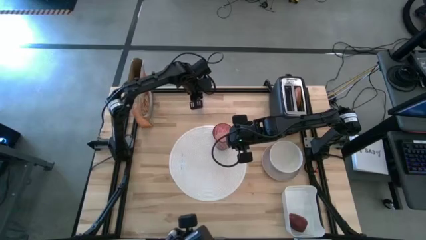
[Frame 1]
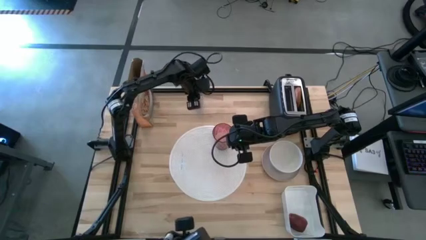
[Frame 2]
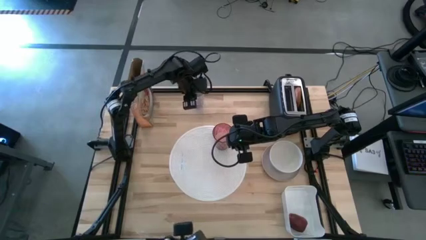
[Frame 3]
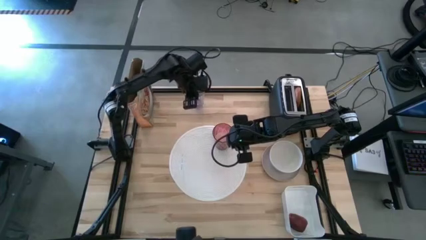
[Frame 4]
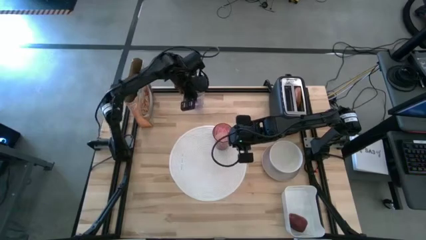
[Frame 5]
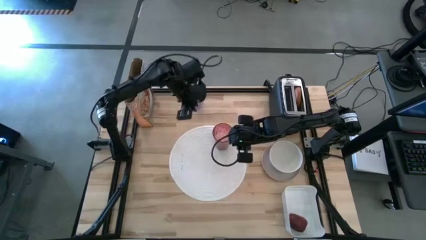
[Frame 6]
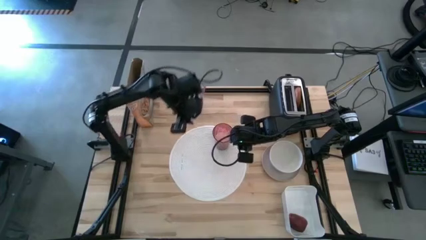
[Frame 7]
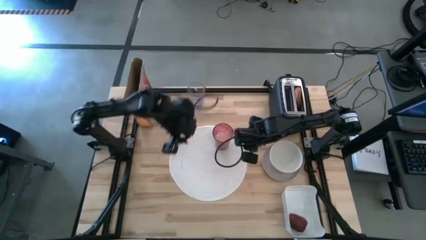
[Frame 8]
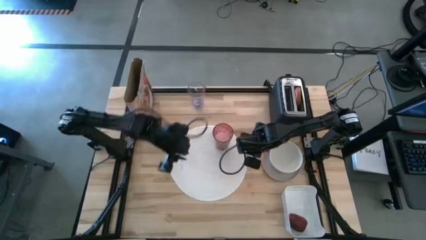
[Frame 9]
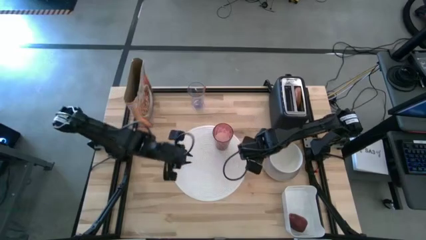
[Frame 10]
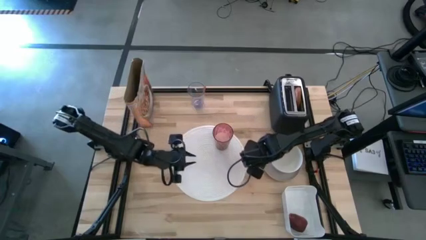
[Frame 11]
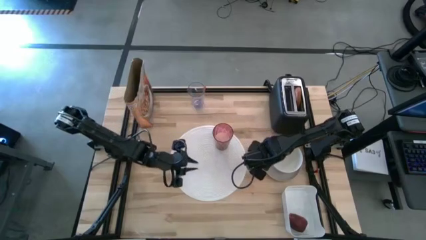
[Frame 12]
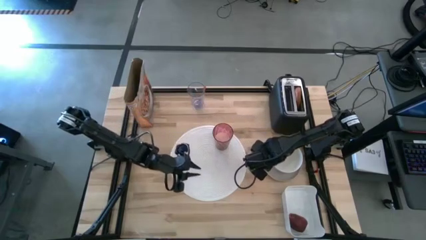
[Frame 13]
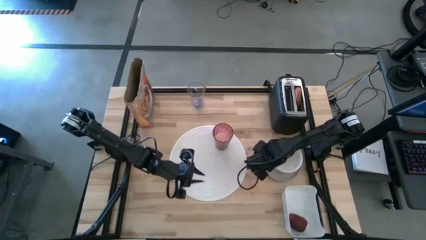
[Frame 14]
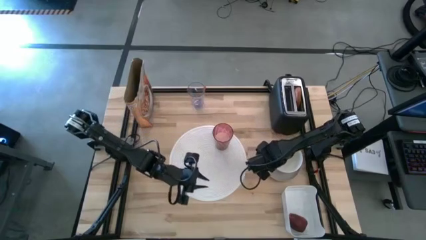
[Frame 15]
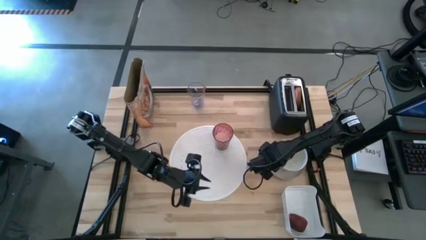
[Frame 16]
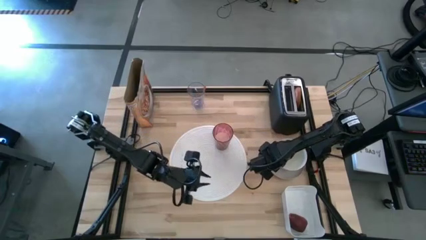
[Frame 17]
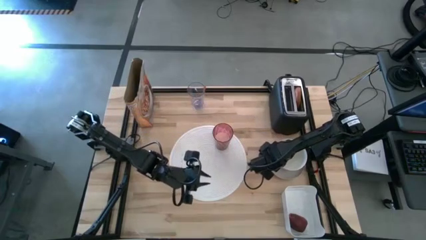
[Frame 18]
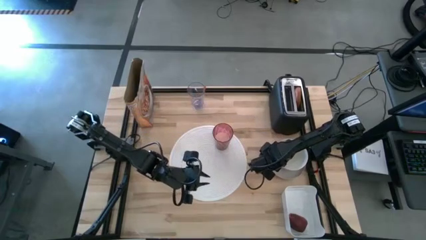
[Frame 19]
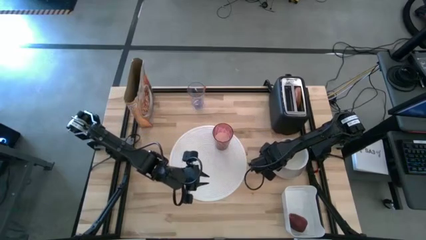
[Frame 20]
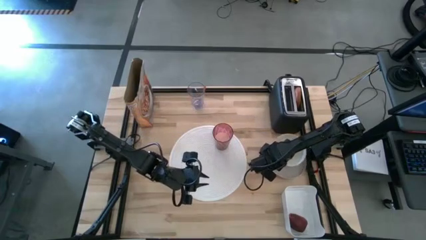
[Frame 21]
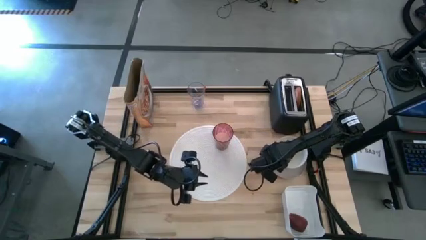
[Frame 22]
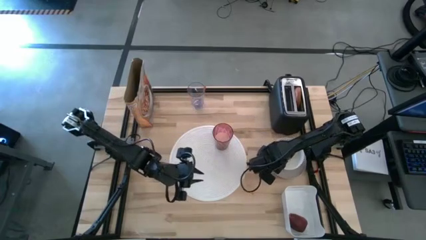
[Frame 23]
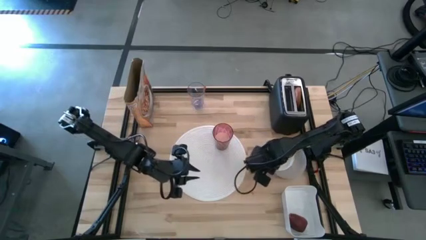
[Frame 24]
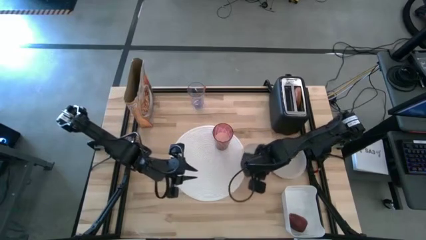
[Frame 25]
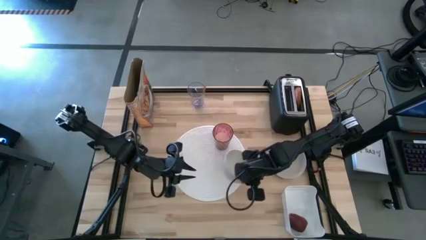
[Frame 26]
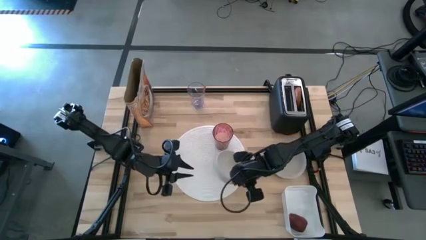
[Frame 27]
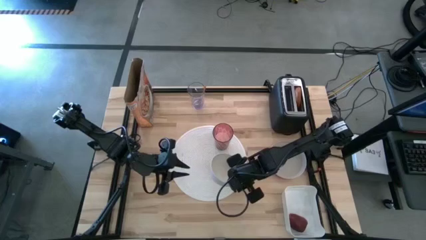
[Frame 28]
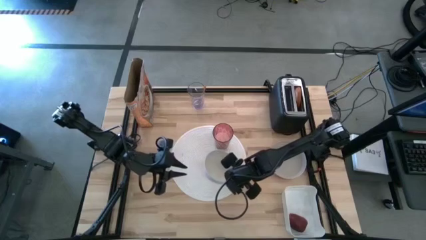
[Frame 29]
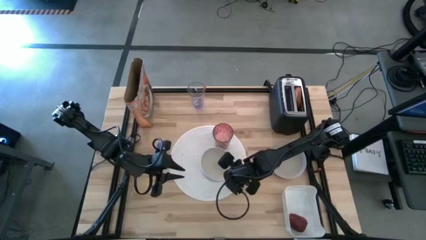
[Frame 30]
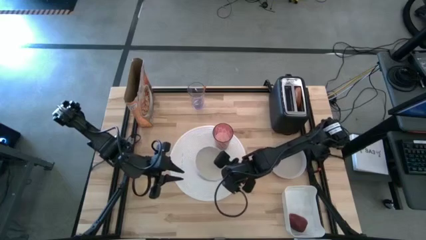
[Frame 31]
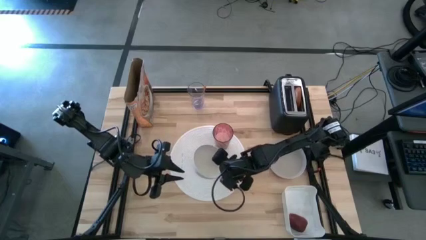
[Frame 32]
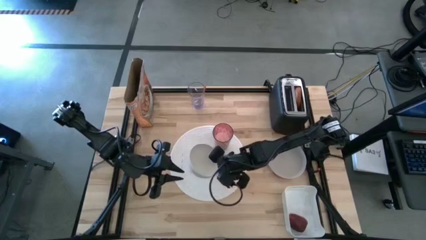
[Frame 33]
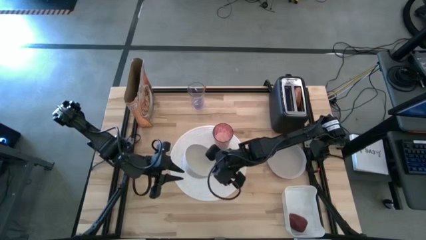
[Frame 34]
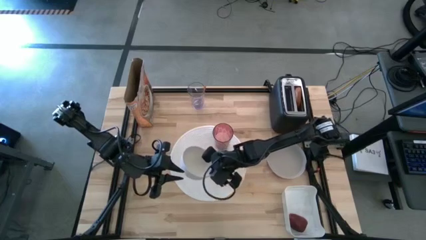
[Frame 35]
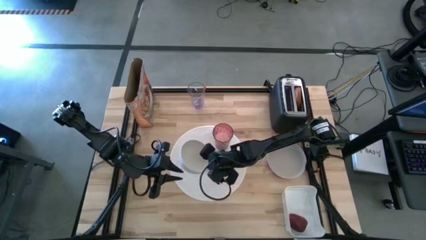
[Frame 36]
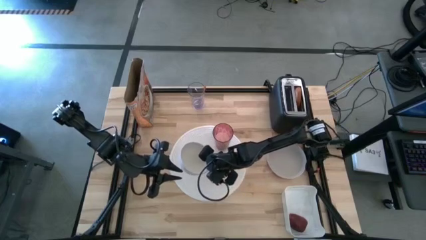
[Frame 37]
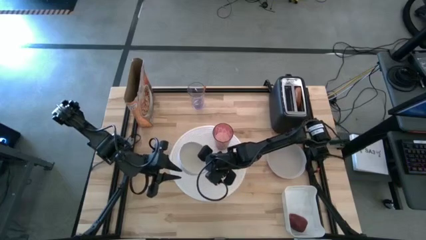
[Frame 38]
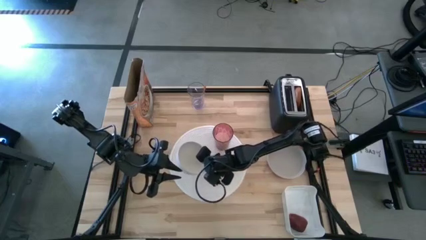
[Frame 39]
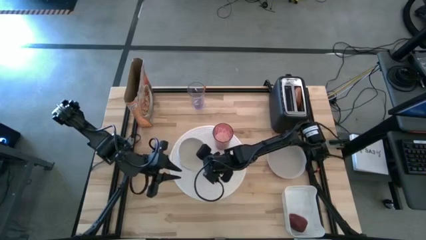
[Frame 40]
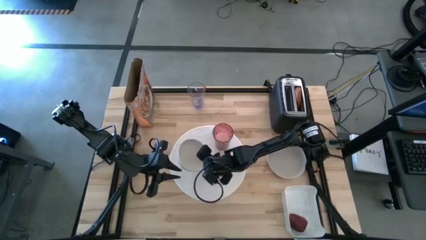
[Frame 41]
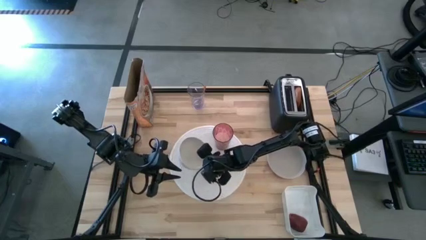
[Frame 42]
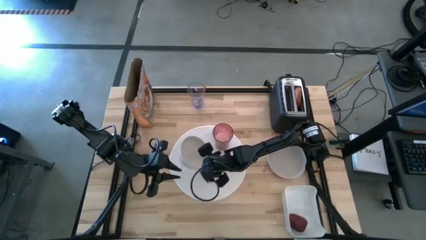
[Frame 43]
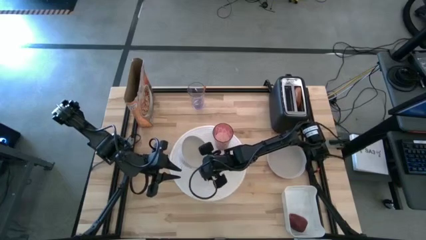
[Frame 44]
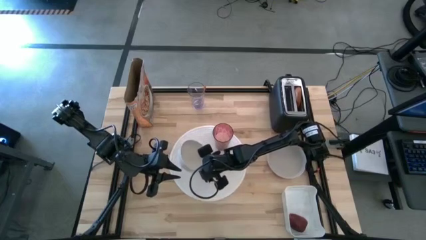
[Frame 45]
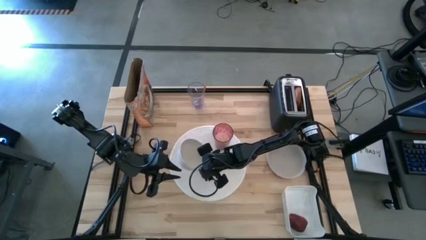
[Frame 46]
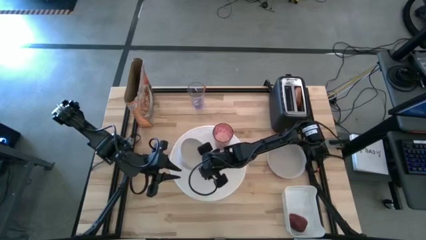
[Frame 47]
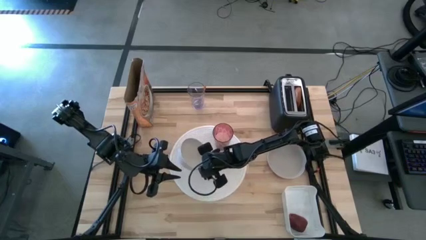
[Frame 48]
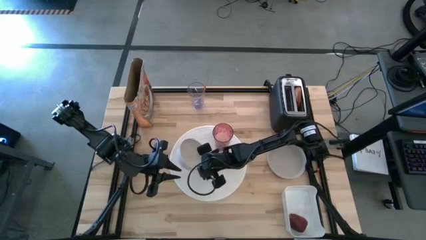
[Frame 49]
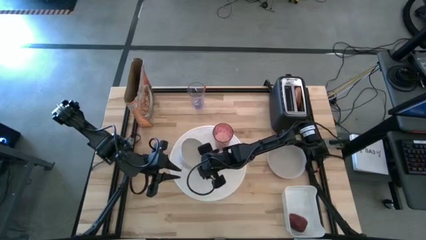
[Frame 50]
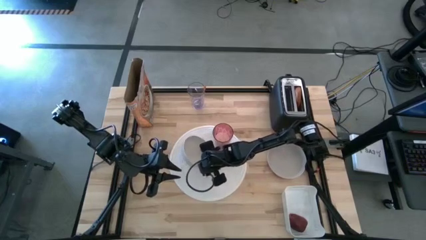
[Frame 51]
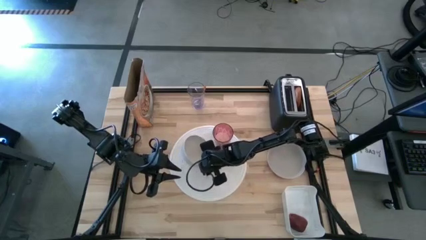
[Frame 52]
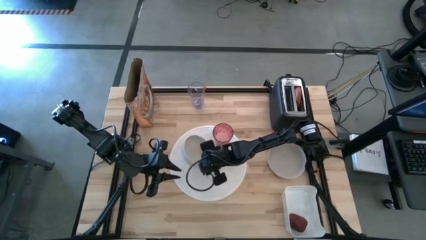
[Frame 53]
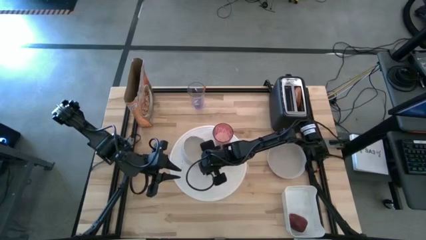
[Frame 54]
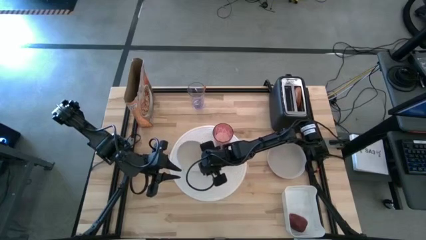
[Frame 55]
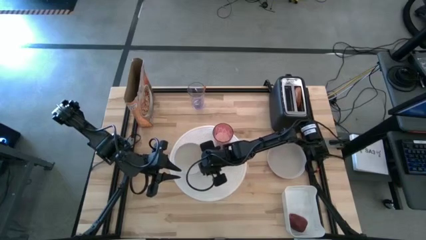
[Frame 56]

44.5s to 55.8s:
Task: Arrange a breakfast setting
Put the white bowl on the white mat

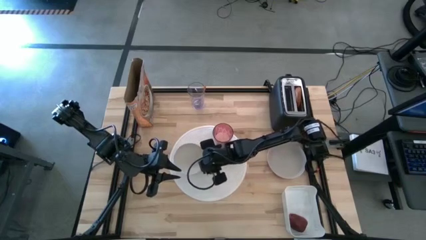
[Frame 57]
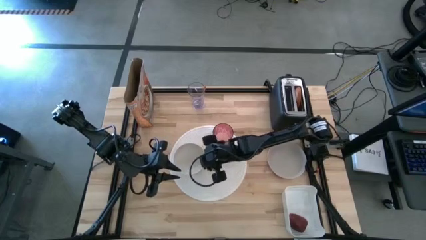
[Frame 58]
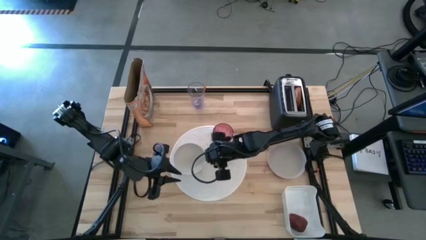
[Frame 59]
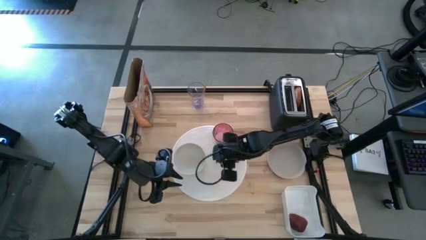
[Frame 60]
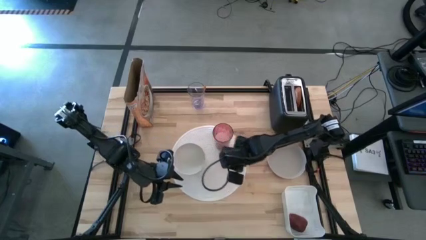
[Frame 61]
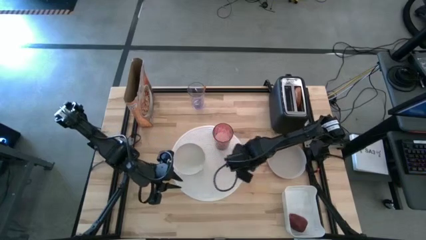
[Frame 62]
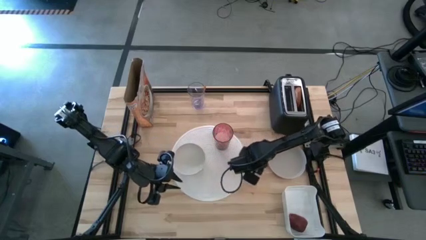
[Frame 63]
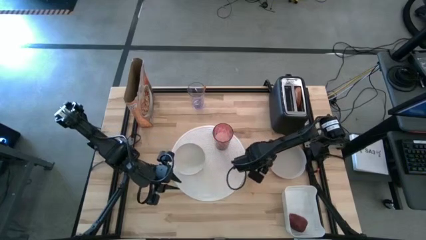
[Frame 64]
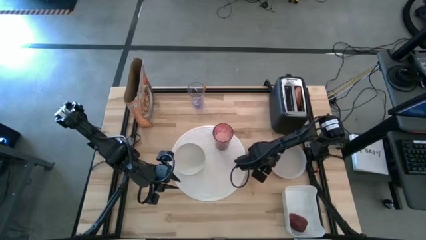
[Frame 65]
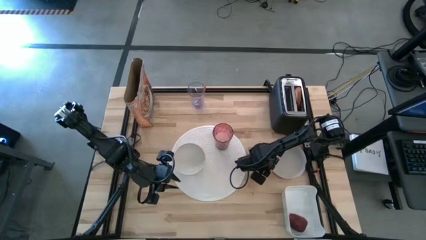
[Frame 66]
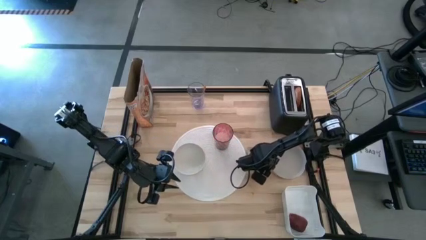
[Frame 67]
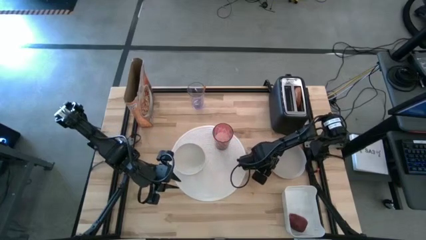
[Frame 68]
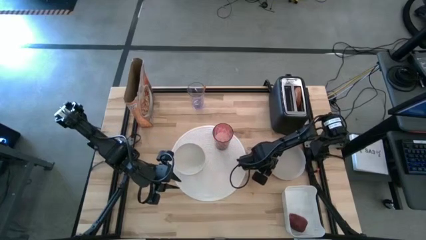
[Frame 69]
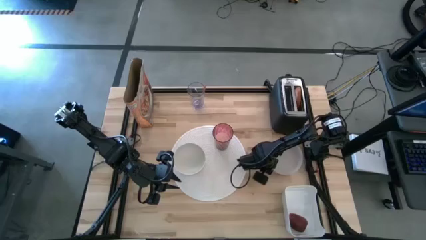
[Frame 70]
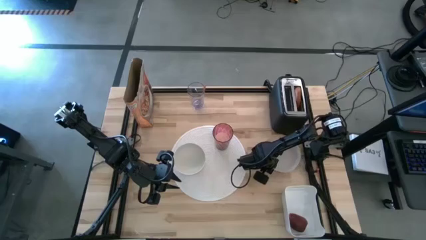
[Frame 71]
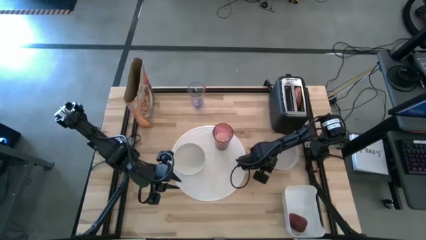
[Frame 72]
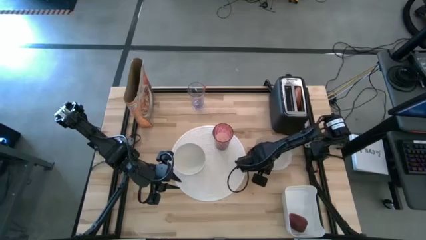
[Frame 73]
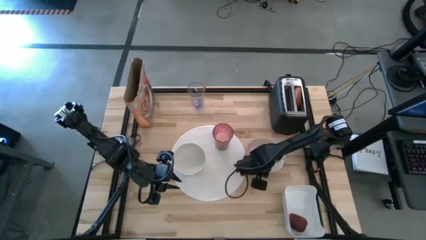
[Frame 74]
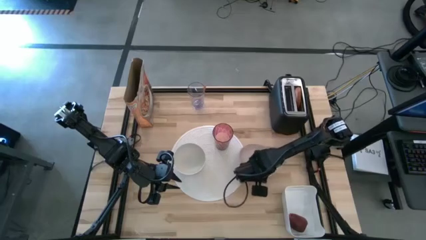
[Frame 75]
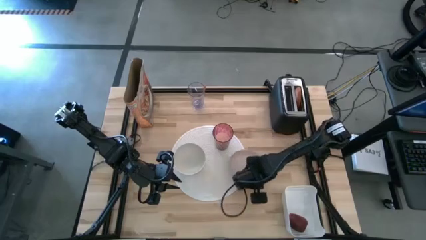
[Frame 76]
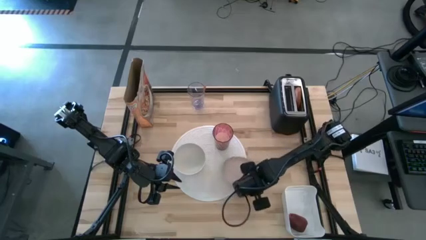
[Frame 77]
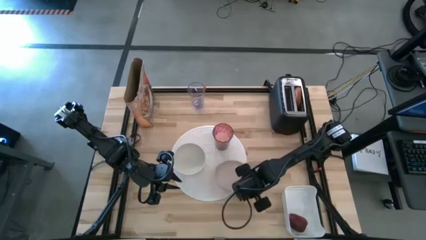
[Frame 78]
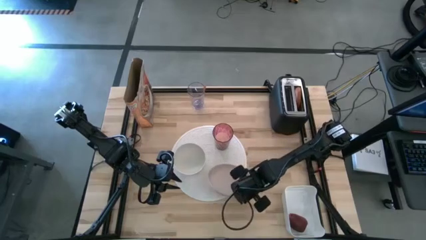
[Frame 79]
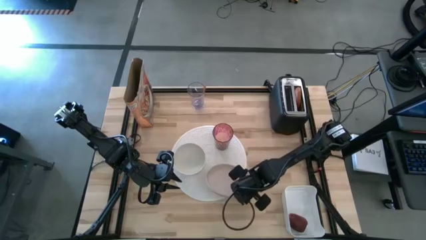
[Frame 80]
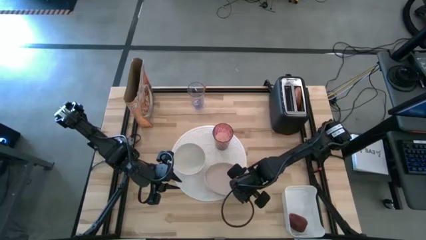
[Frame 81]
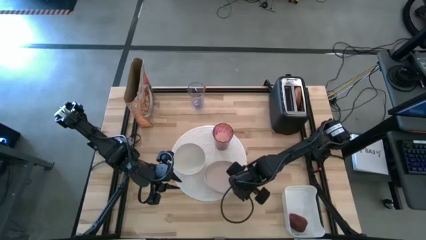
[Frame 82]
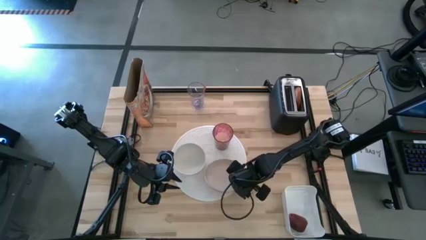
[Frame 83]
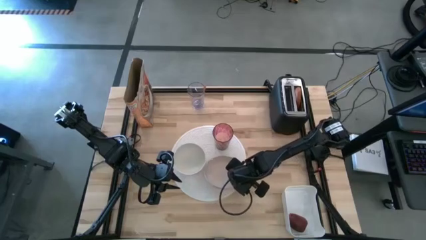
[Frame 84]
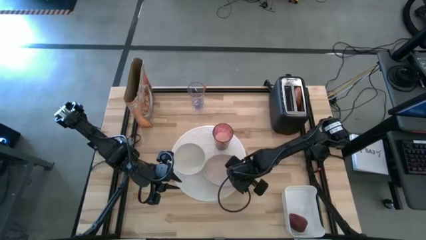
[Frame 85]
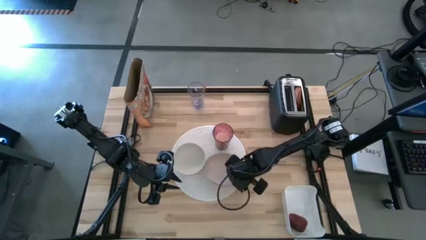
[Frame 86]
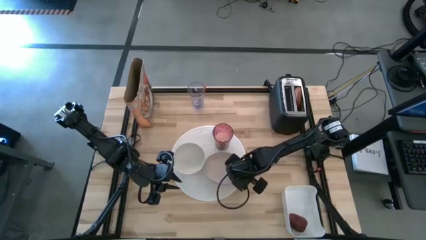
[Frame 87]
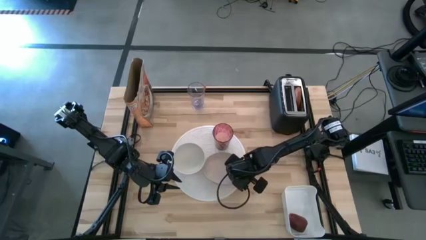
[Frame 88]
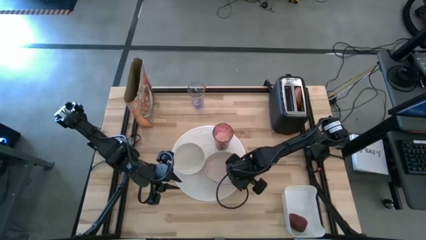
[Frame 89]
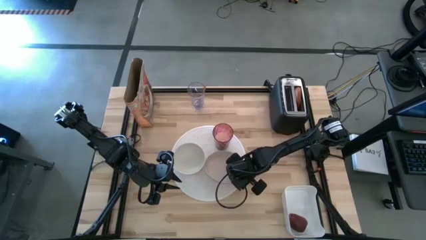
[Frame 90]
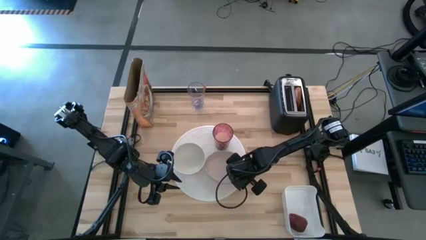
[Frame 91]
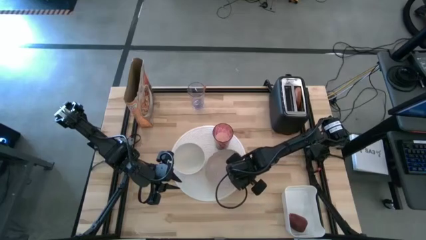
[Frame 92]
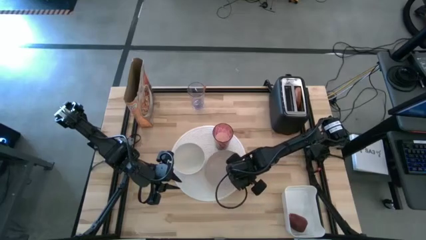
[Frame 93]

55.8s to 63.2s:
Put the gray plate on the white mat
